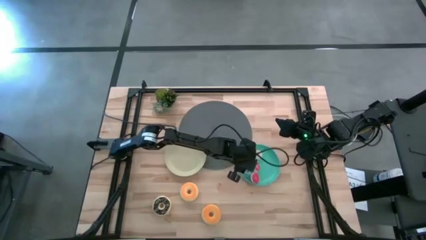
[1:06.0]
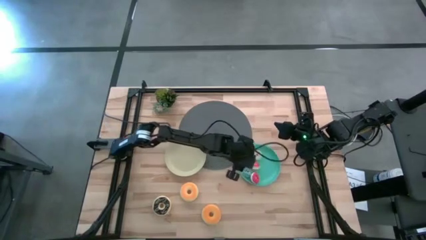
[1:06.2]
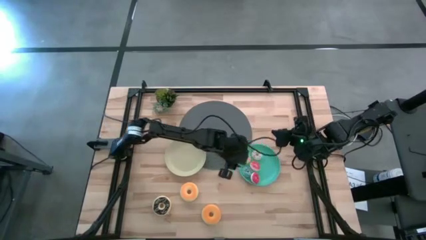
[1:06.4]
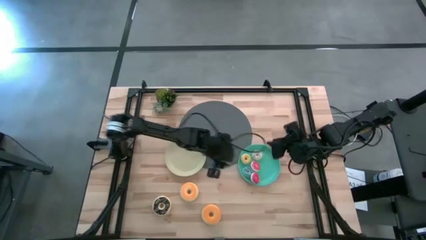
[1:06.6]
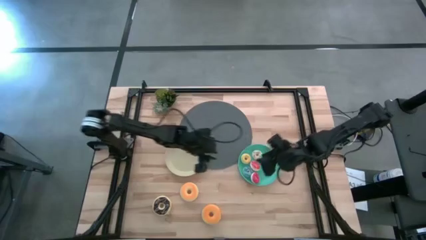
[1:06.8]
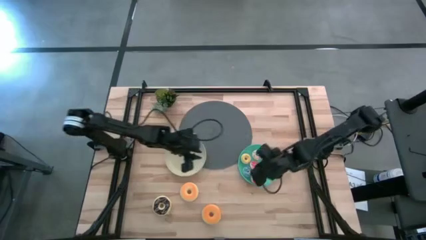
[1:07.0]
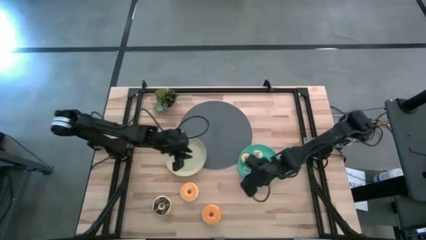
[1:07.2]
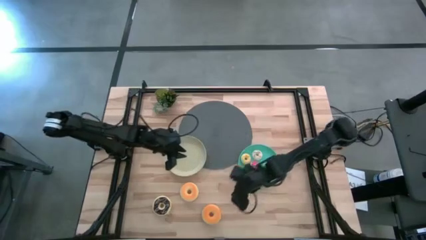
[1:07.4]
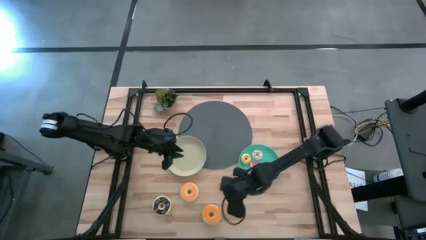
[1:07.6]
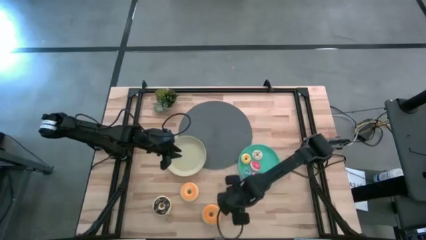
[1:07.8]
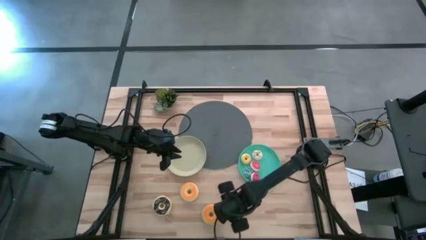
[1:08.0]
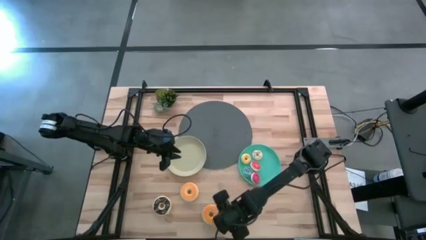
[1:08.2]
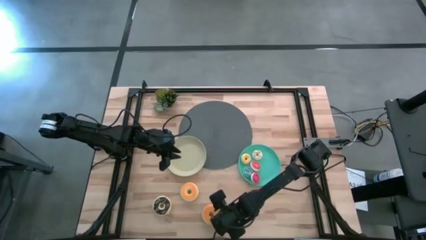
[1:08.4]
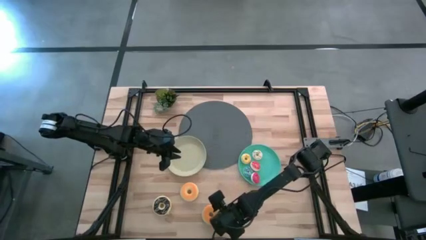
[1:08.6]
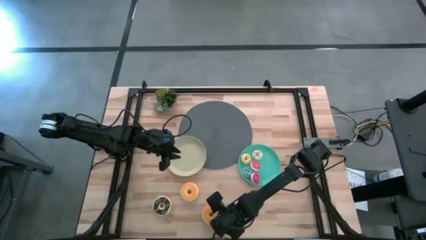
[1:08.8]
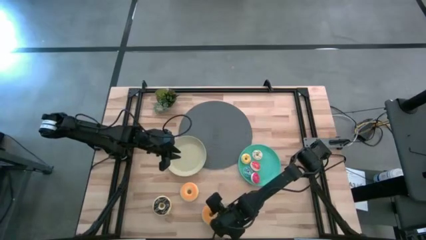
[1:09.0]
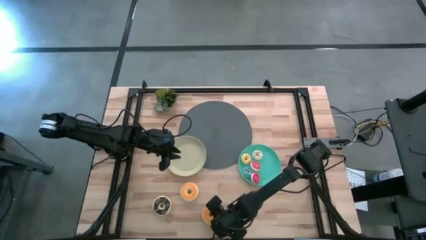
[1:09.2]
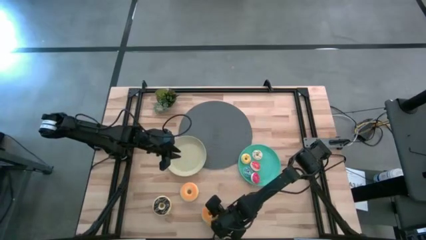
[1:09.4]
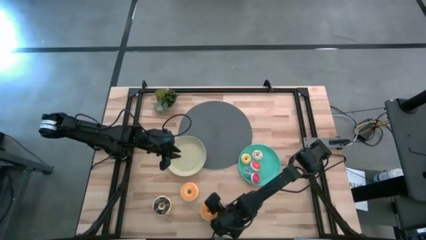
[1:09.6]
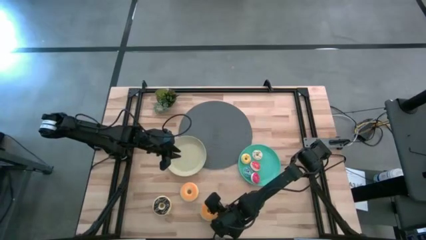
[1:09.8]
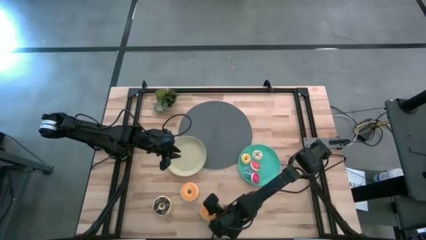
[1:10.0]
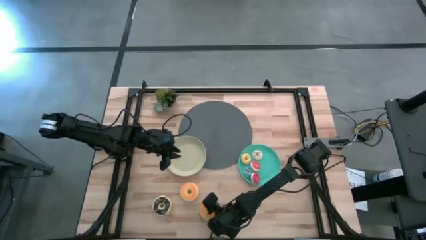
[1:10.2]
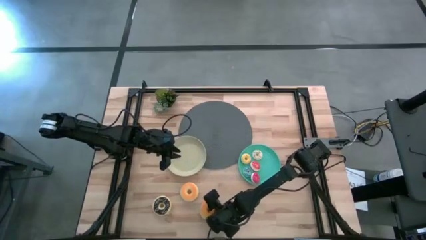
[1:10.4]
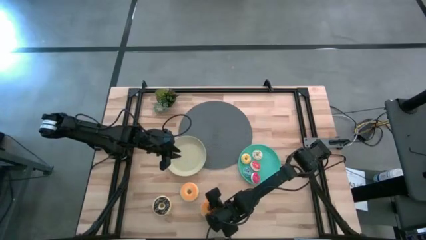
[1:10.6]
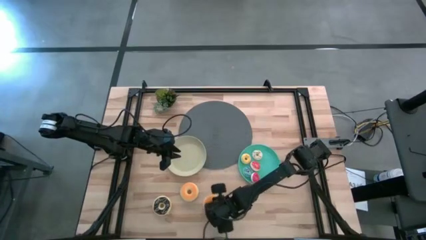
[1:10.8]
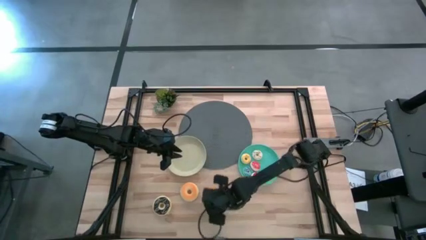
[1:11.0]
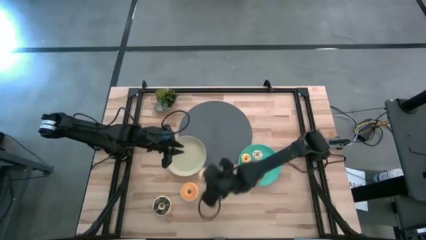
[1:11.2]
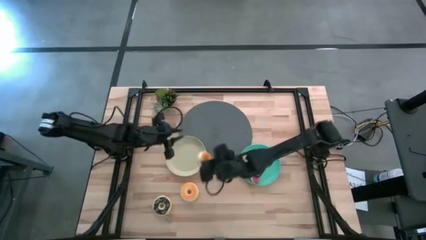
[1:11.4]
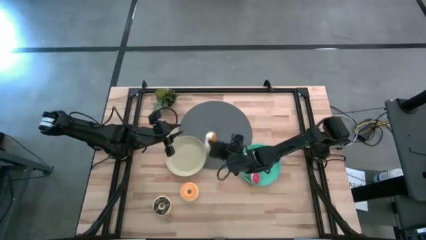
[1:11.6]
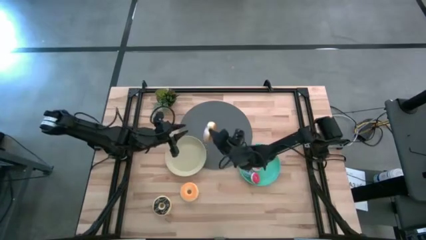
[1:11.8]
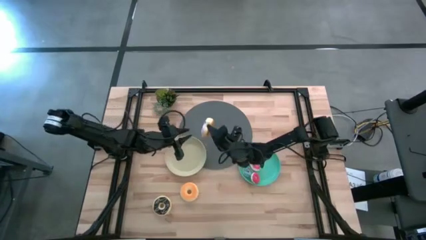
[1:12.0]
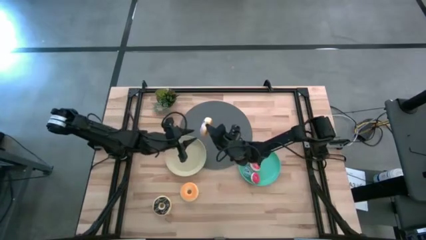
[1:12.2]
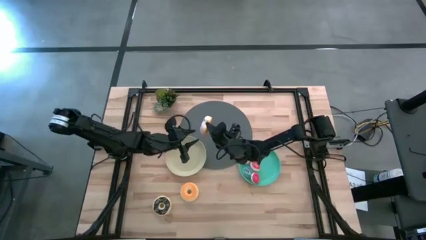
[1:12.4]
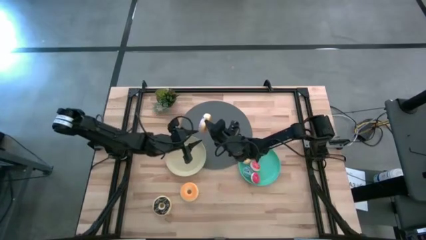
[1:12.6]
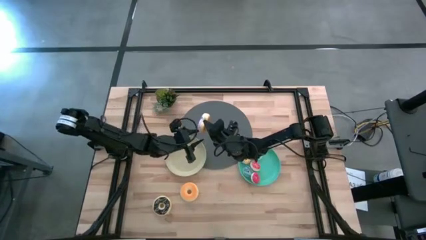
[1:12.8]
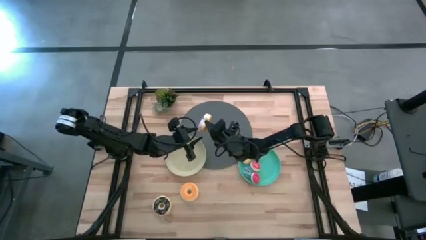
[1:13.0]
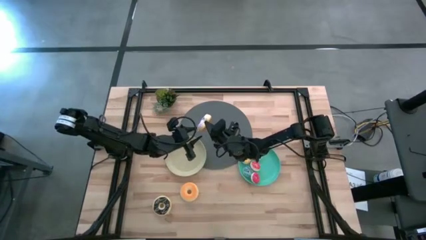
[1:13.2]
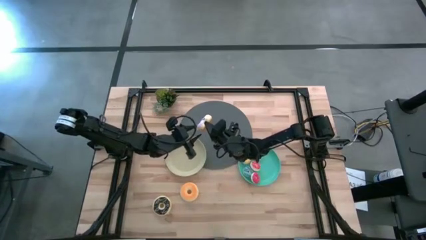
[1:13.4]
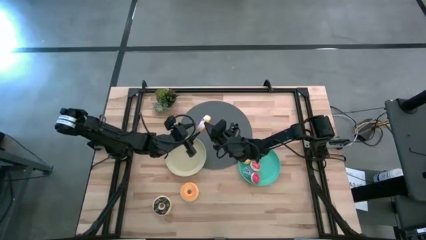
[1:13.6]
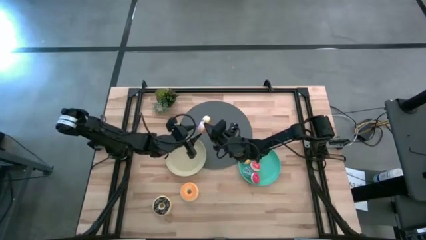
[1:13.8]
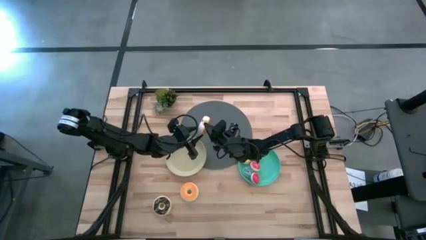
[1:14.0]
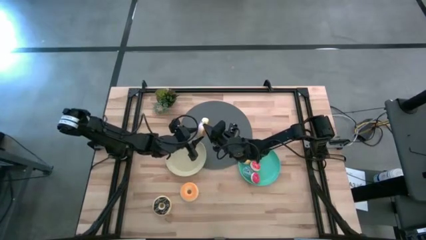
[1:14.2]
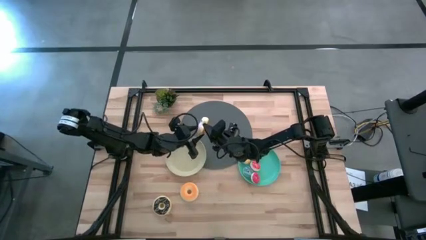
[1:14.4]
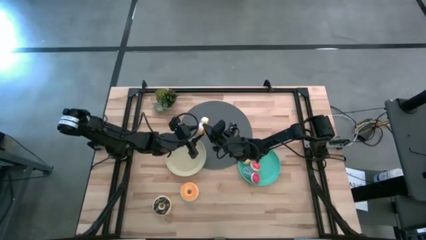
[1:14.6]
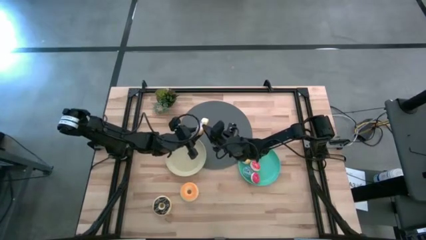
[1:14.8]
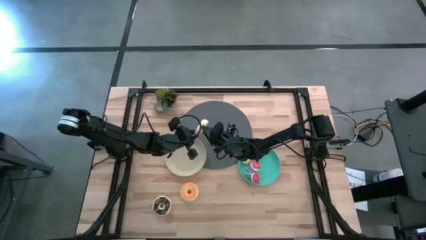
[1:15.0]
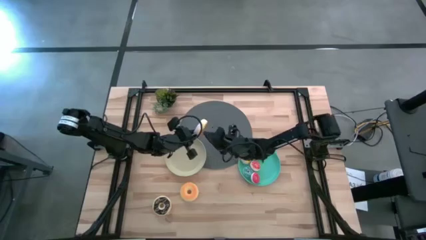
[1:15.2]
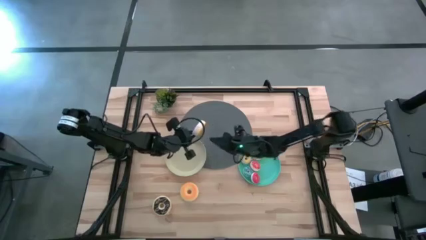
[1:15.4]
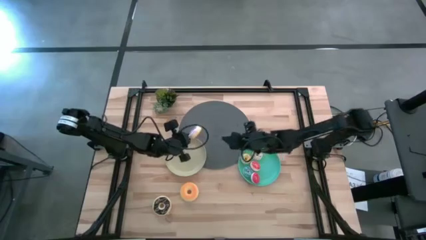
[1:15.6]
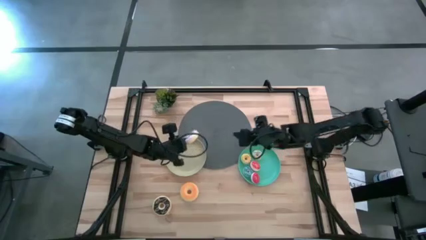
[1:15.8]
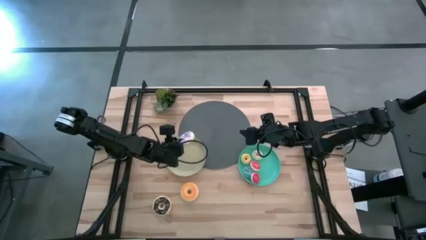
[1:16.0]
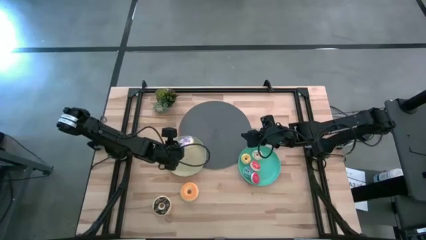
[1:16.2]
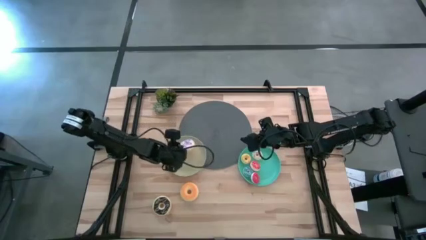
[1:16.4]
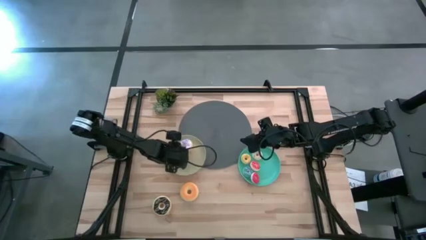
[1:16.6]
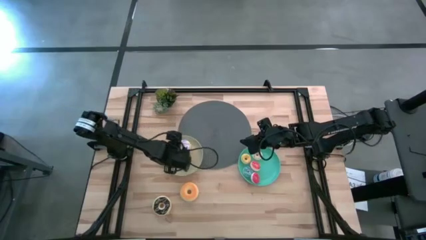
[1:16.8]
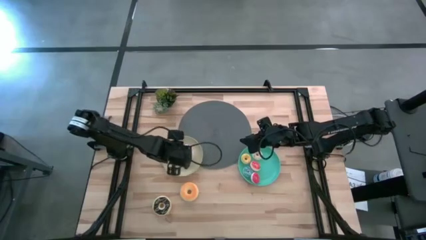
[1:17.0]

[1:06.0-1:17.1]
Task: Pick & Place donuts
Put the large purple donut on the brown plate

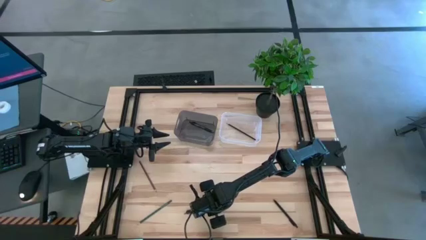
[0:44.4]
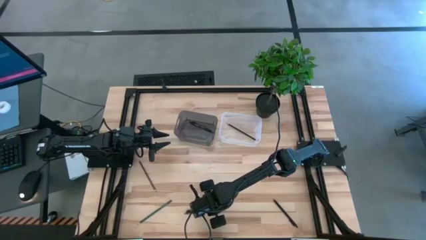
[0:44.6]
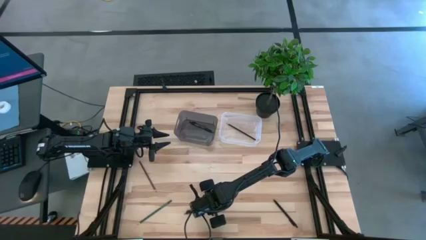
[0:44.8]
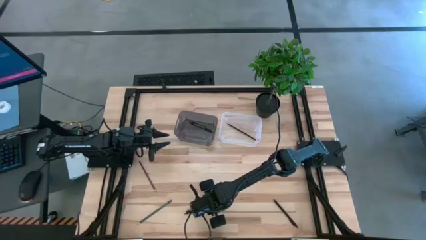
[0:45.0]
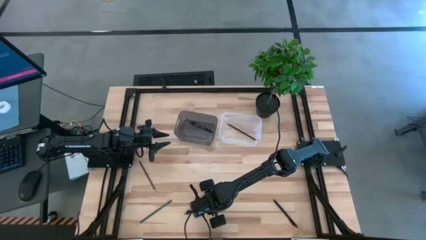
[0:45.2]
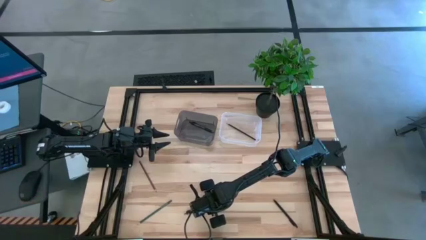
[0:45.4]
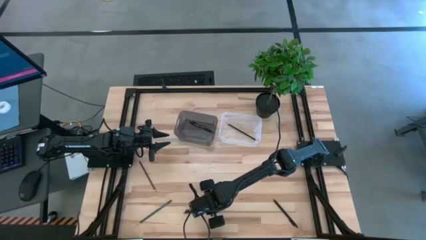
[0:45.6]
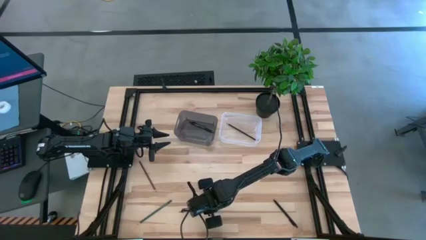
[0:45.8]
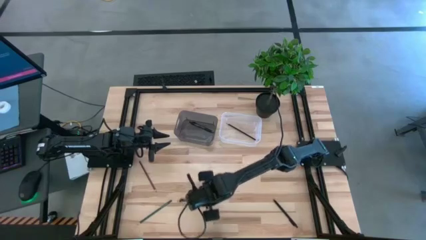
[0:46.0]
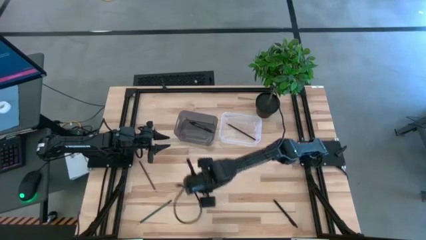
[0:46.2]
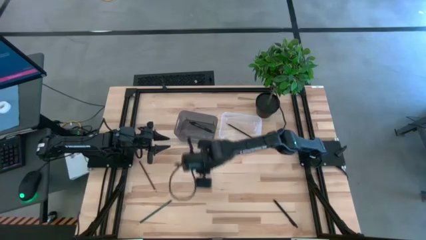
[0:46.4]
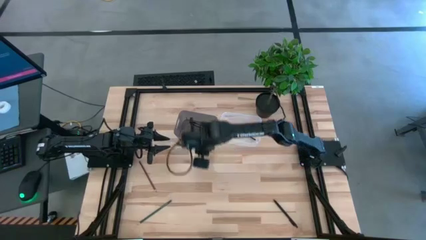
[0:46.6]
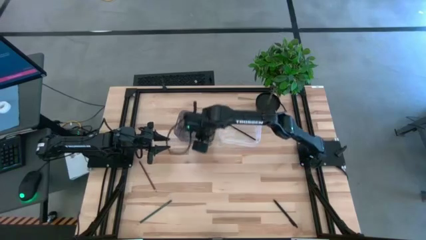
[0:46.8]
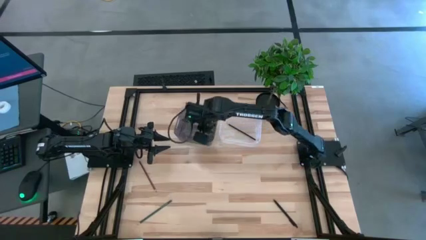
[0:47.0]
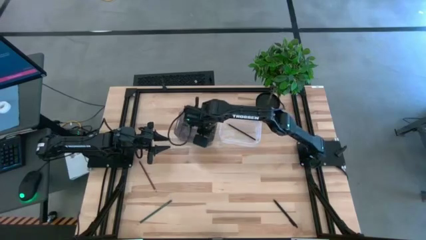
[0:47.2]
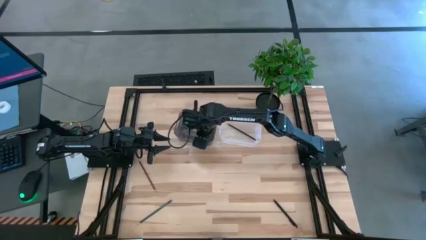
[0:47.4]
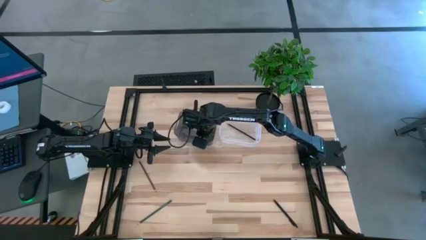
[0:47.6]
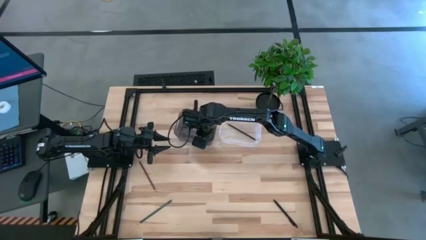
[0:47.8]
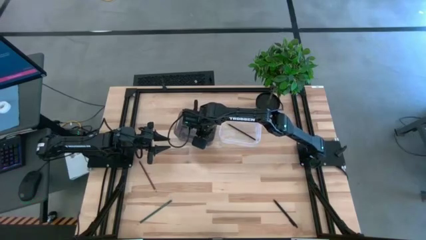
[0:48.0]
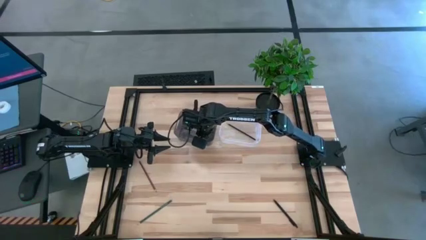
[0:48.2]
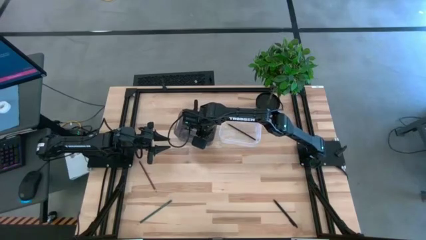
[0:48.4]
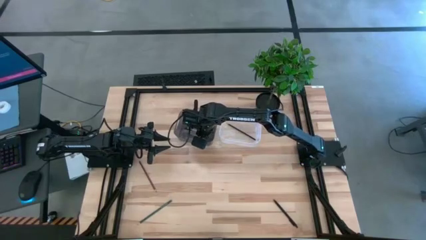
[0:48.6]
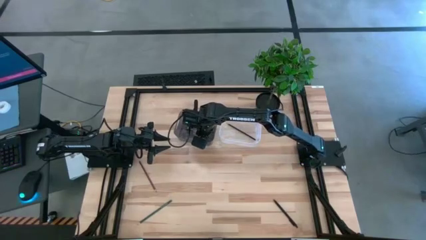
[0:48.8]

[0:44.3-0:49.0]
Task: Sort pens & pencils
Put the left black pen into the black bin
